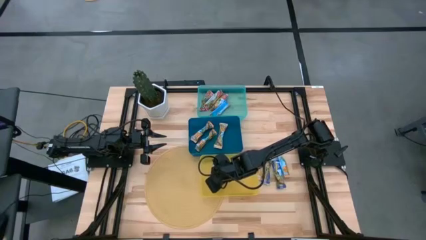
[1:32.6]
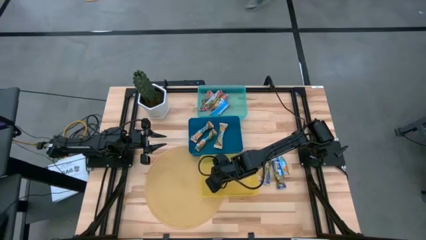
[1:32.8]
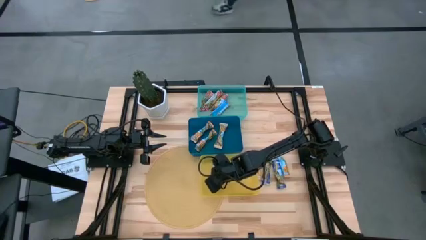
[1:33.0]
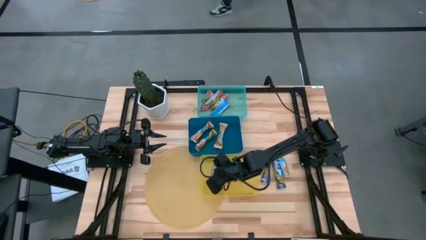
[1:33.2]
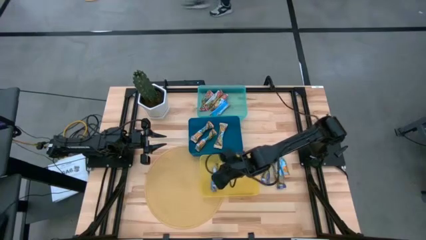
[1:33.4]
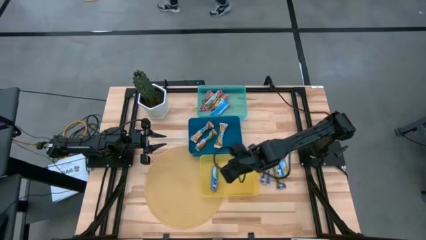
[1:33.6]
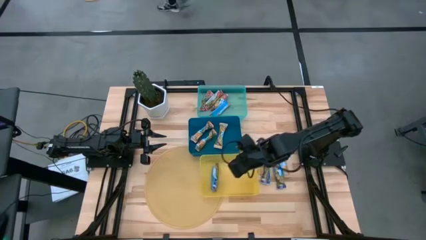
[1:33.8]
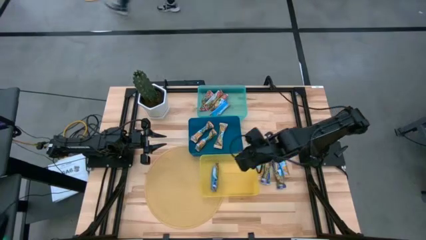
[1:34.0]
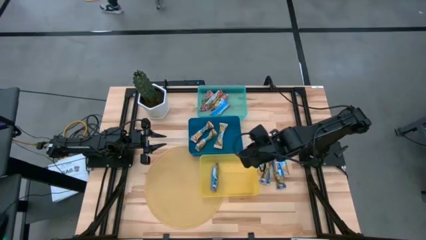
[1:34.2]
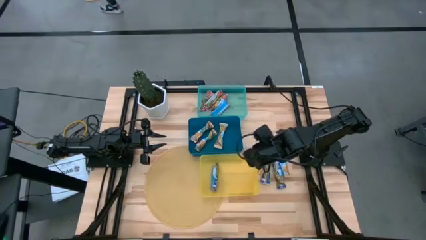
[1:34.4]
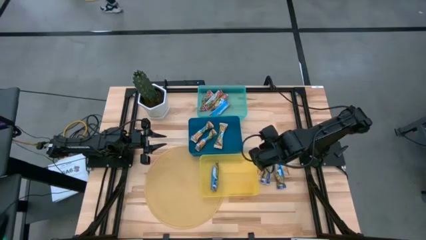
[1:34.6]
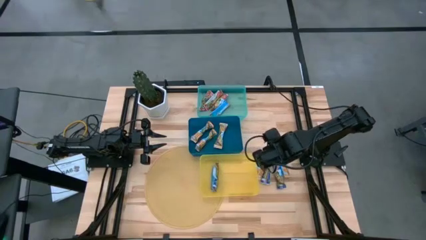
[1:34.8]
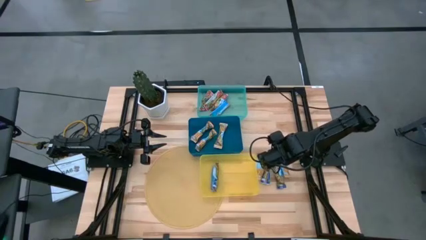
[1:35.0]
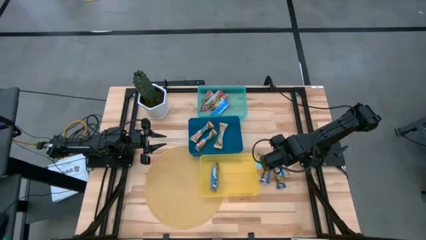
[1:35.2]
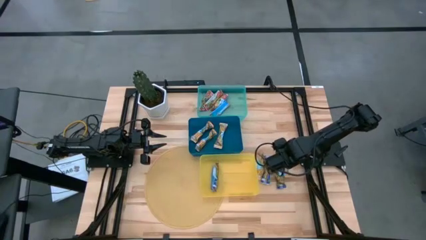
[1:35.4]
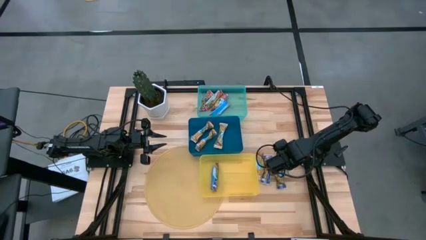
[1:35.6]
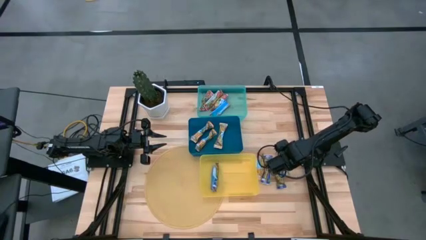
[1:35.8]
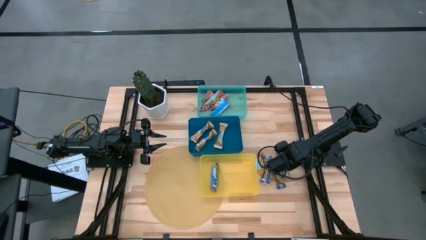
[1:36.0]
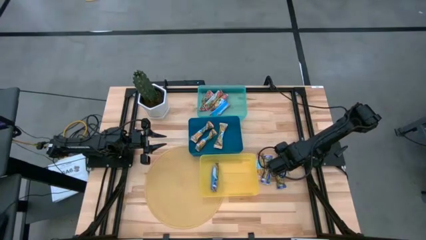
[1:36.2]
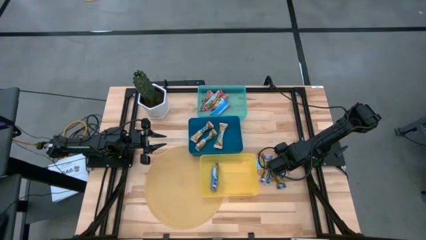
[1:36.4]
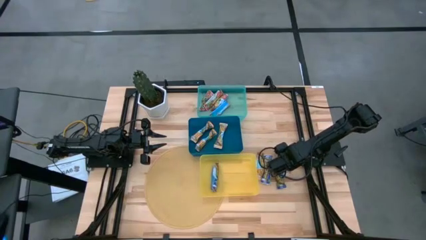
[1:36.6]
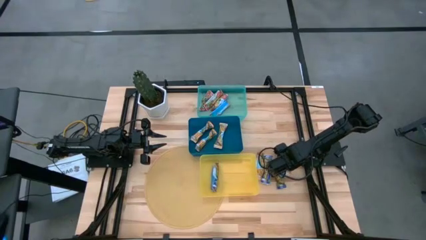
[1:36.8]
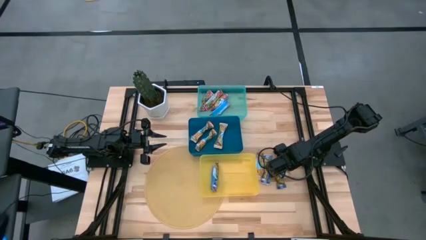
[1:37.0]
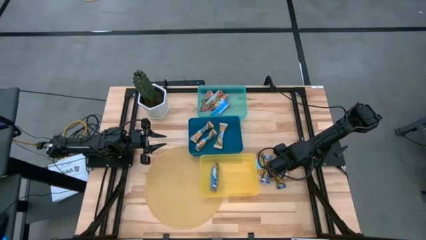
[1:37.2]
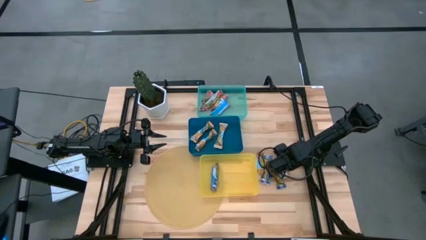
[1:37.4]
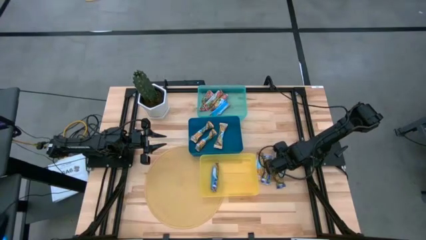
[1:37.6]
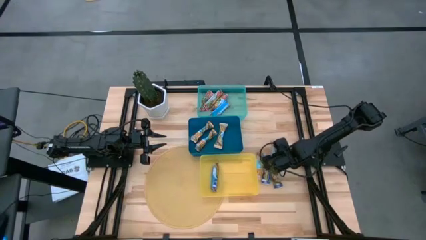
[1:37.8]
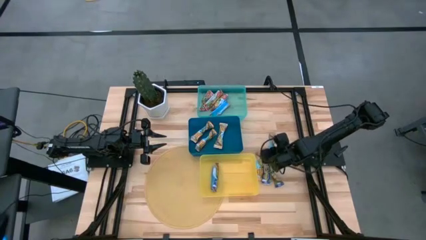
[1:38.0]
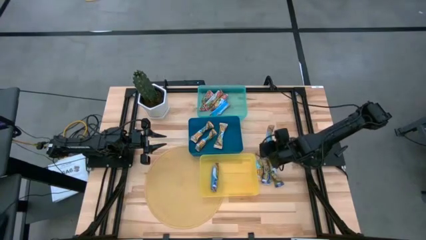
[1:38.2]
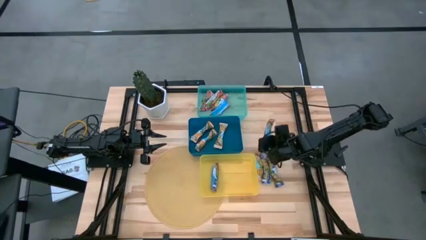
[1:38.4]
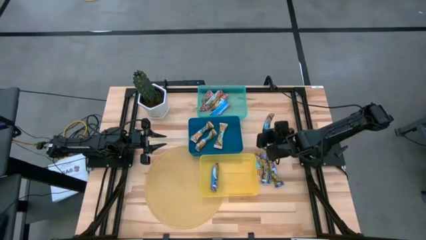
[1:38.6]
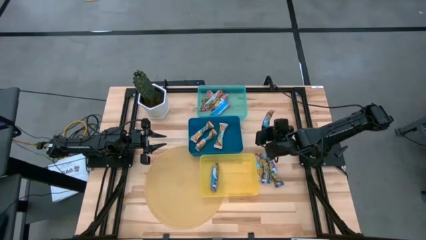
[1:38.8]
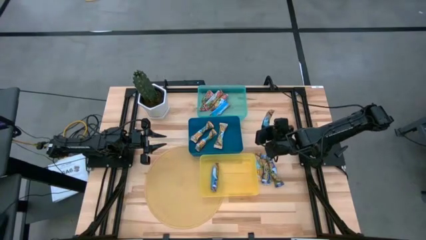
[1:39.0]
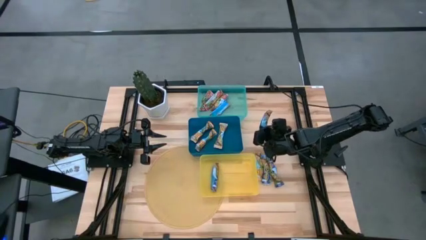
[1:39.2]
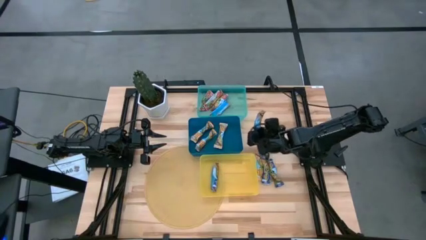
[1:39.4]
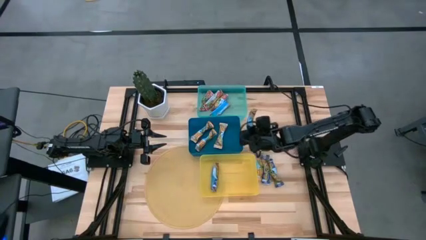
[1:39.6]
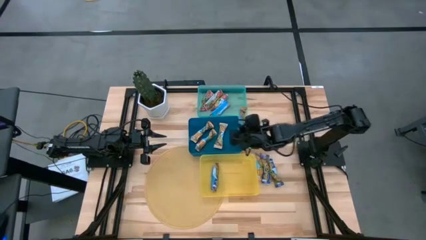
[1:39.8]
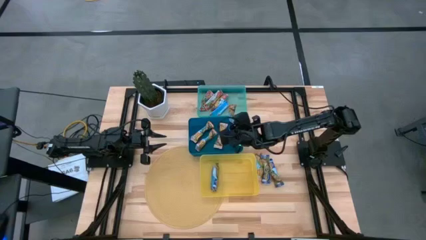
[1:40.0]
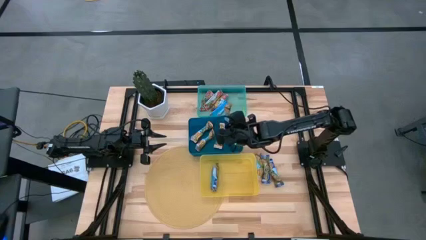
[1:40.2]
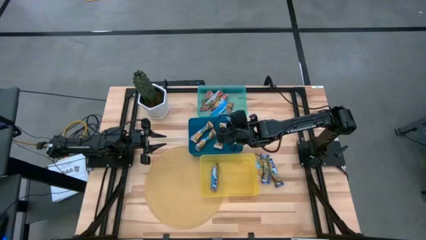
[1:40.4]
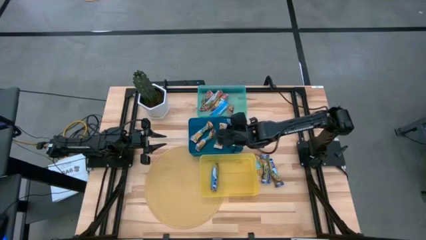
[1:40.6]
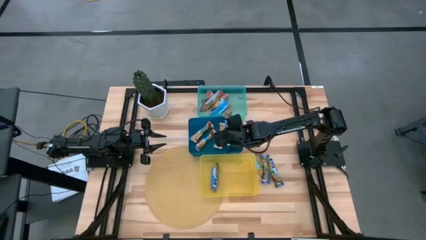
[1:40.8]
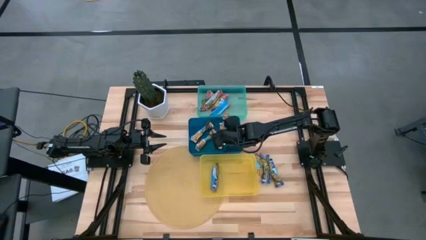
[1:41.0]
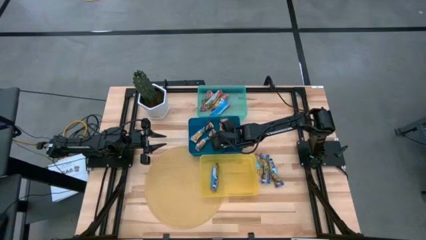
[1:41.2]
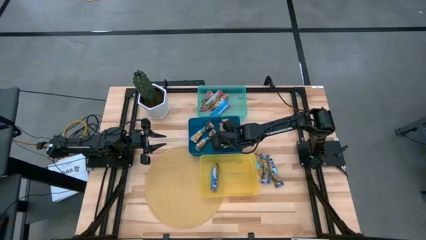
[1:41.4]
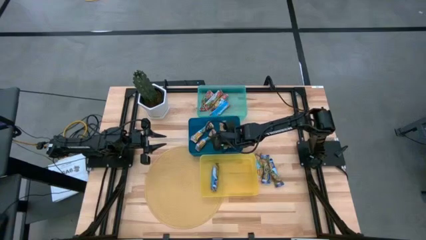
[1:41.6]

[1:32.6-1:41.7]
Task: Pick and place Granola Bars by type
Put the yellow granola bar into the blue bin

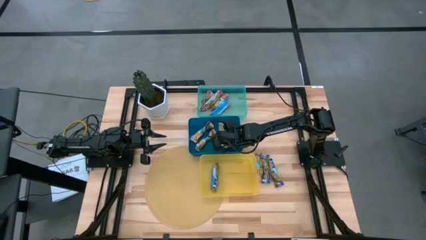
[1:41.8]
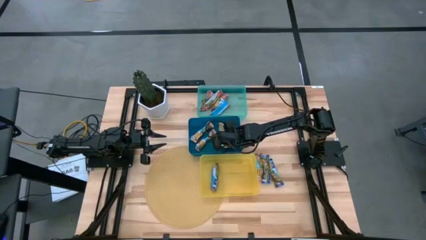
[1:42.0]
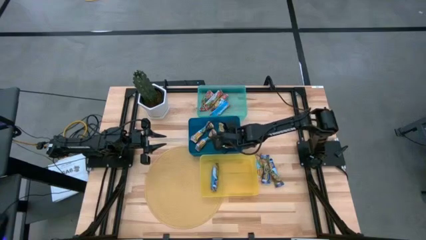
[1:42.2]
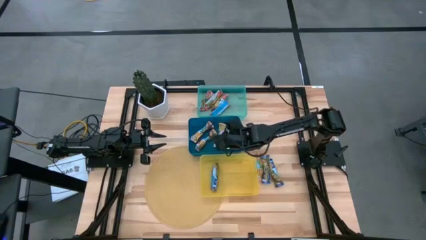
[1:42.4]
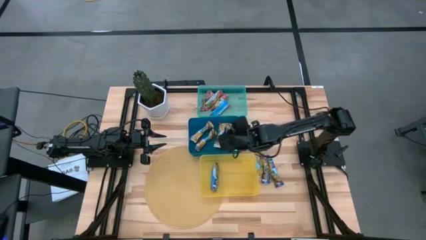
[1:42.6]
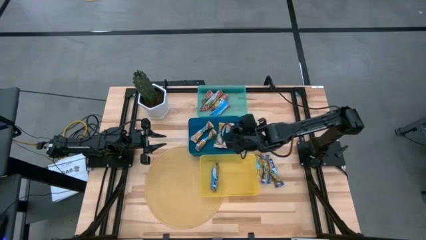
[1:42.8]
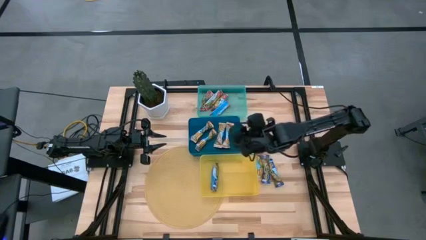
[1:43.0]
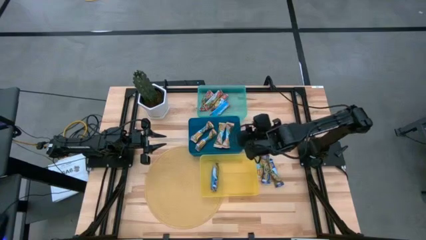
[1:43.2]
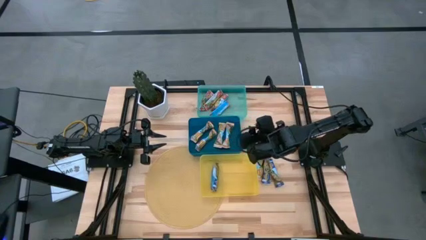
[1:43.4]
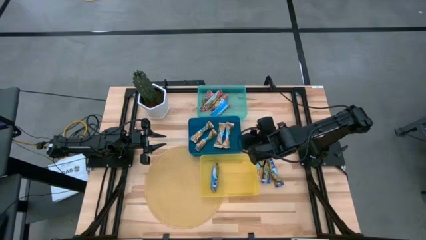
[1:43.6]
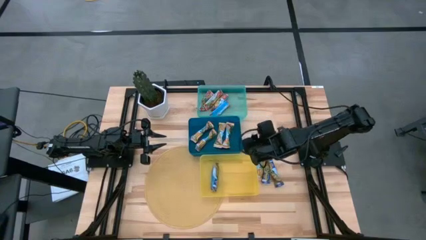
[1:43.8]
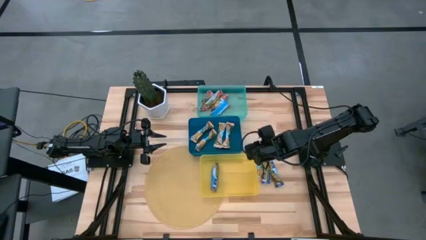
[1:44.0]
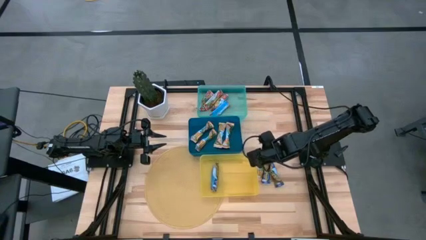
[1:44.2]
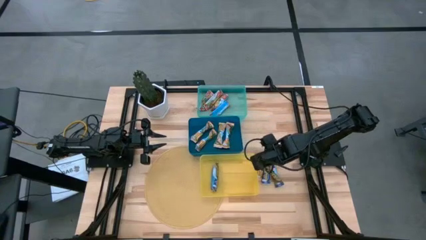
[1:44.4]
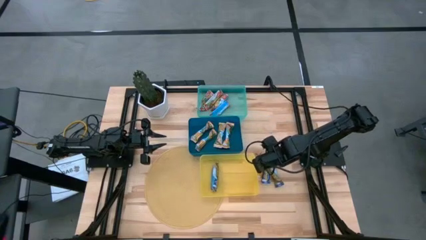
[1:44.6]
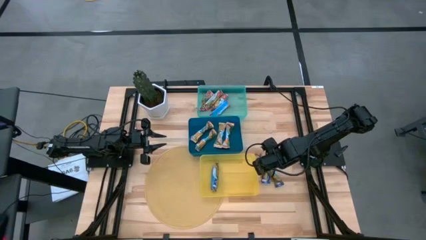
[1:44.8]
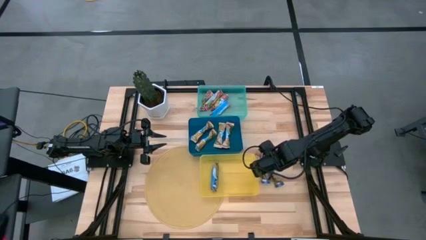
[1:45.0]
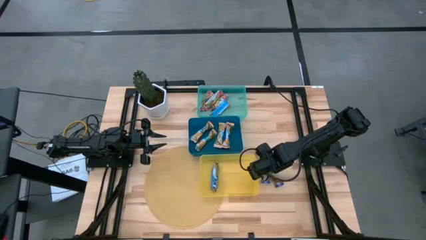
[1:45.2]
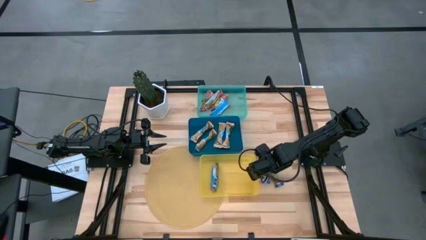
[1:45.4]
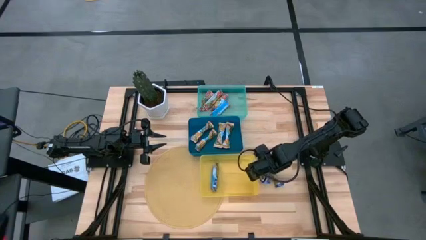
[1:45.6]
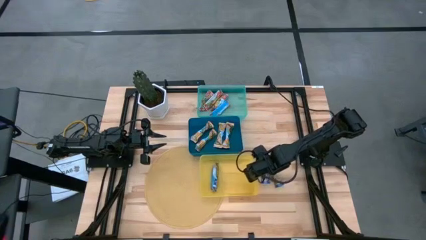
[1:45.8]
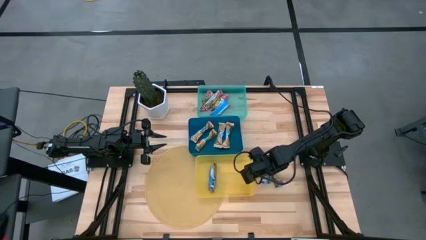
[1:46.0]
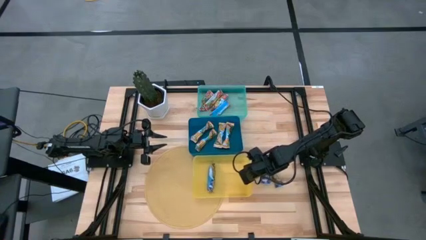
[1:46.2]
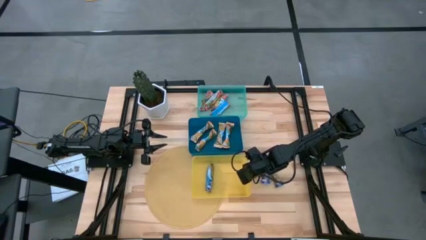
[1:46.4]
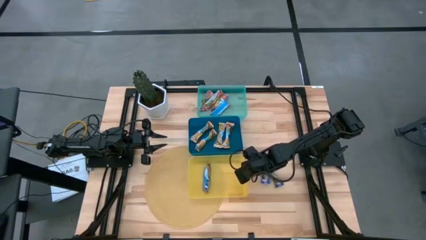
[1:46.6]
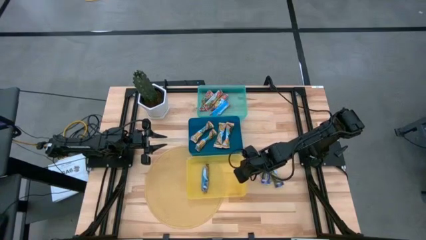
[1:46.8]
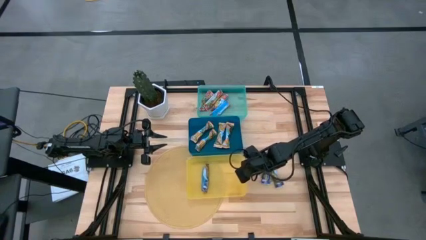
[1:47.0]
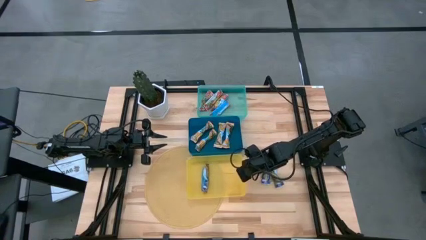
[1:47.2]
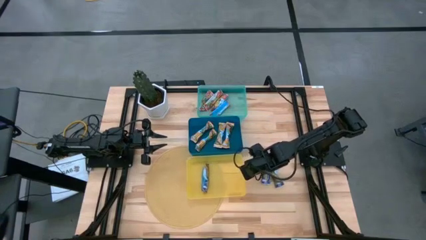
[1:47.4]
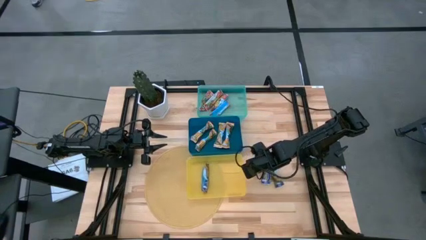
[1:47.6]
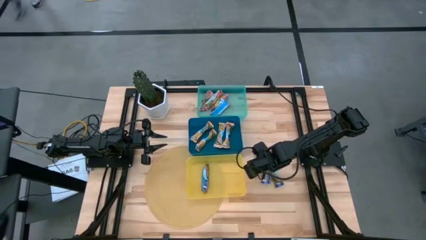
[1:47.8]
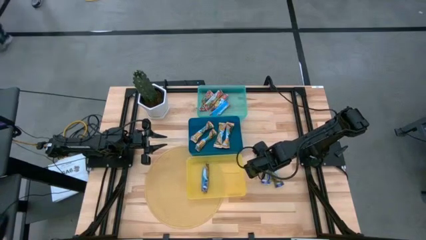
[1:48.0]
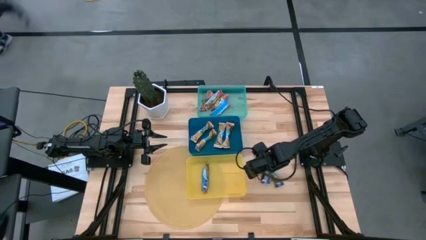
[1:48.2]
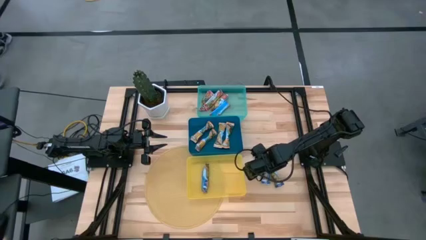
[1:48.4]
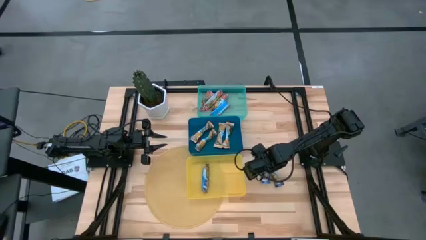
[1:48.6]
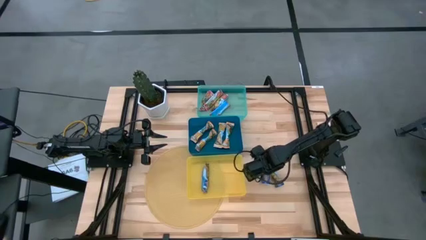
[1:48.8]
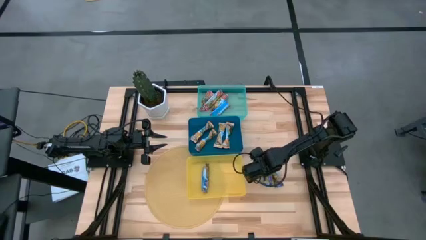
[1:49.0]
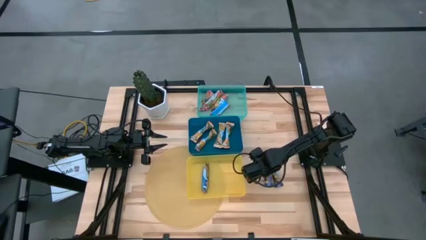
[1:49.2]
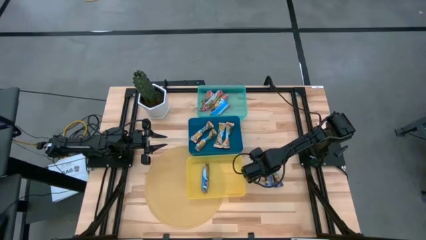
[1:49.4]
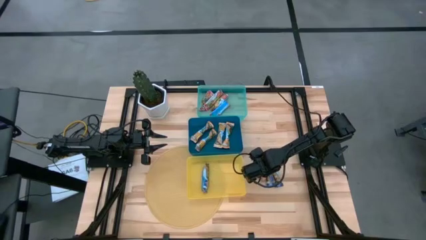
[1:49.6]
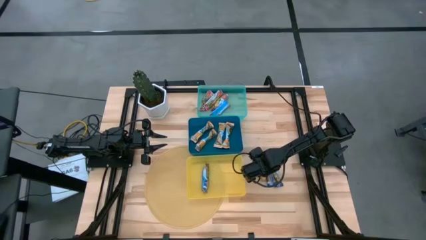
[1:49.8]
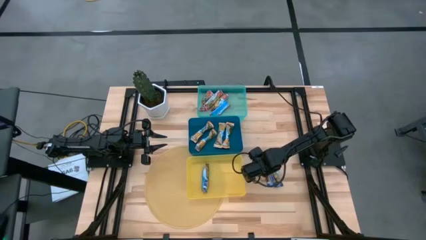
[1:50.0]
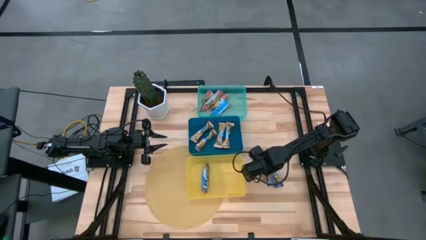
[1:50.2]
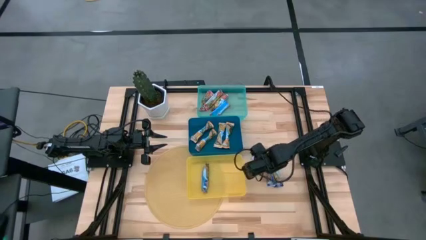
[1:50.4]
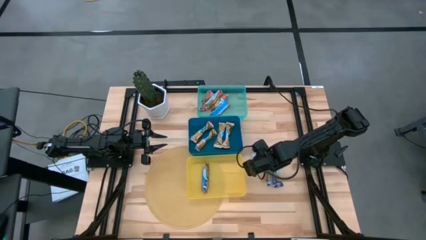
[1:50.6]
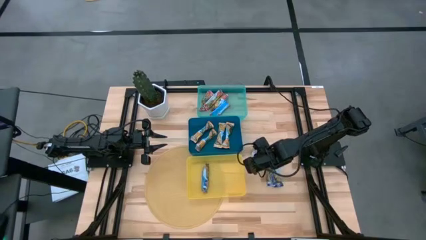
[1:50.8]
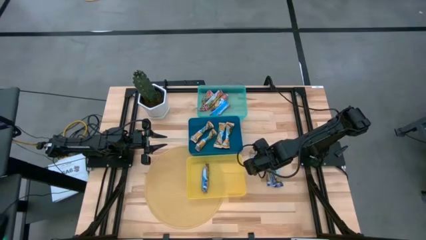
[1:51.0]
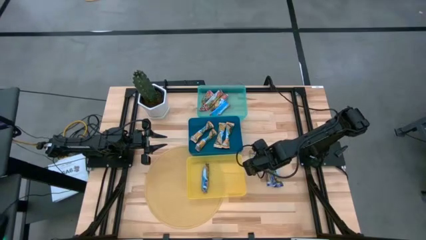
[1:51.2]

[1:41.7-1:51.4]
Put the yellow granola bar into the blue bin
